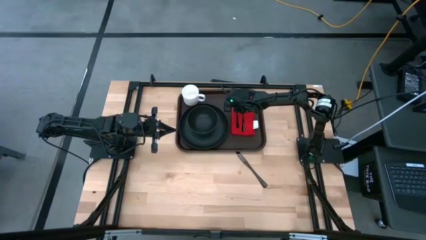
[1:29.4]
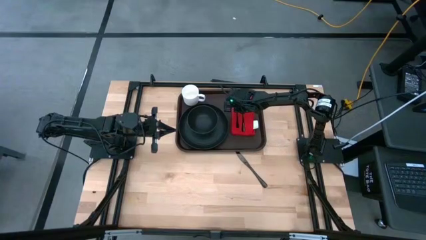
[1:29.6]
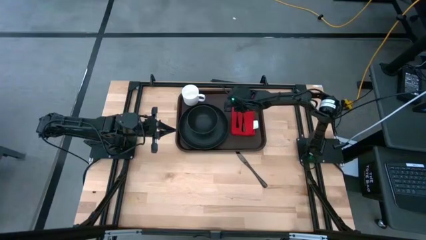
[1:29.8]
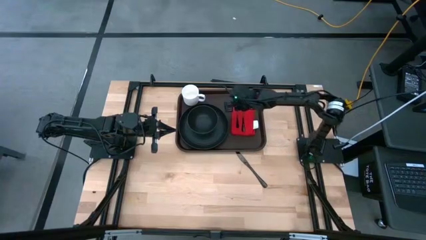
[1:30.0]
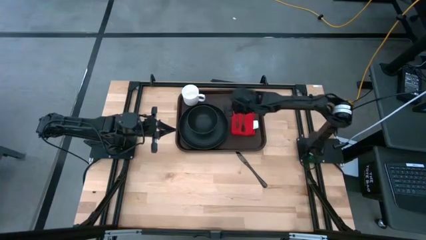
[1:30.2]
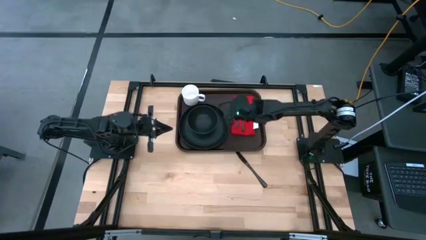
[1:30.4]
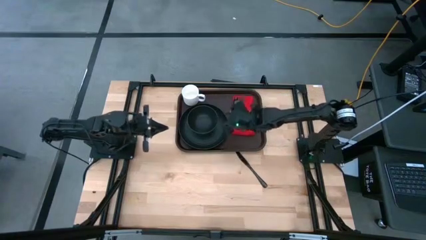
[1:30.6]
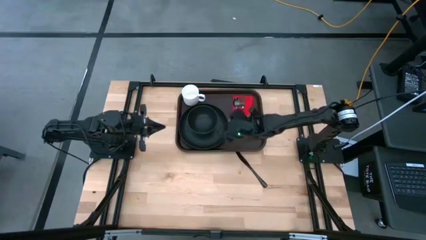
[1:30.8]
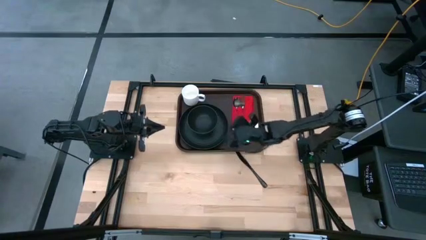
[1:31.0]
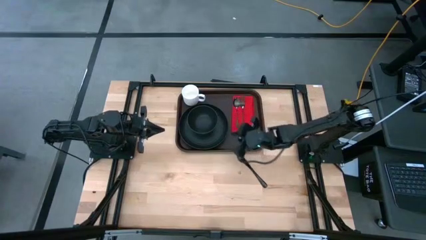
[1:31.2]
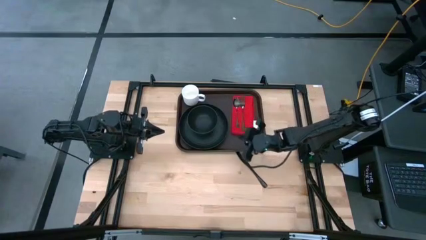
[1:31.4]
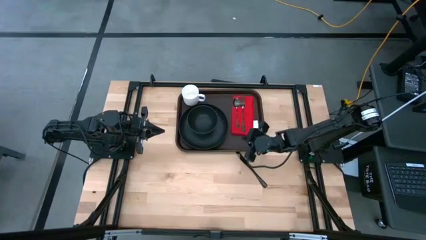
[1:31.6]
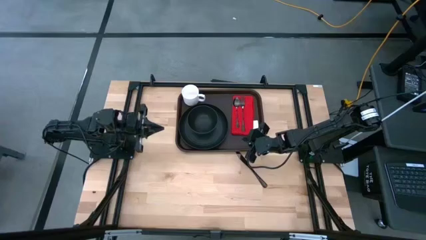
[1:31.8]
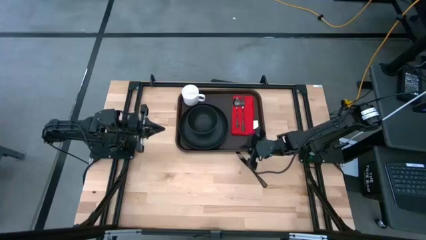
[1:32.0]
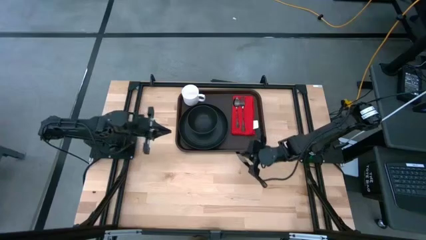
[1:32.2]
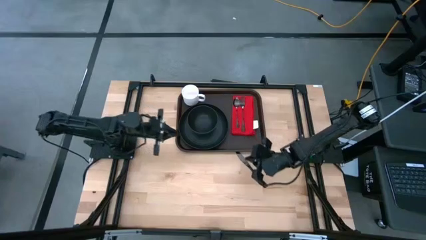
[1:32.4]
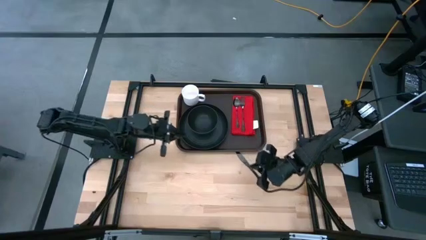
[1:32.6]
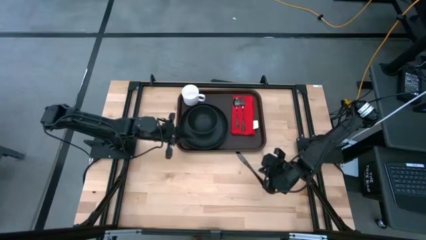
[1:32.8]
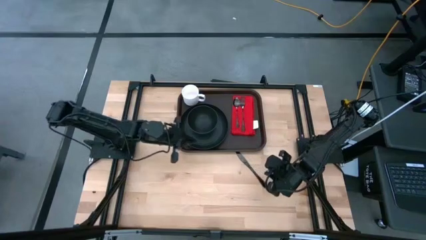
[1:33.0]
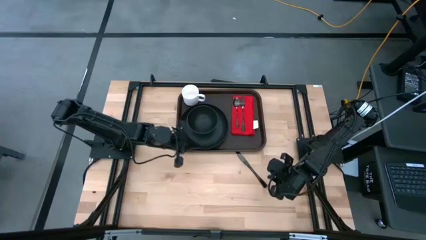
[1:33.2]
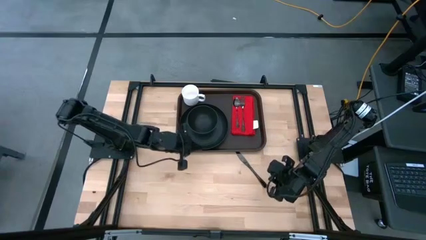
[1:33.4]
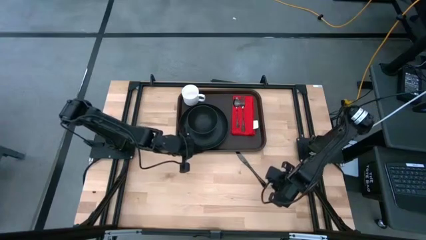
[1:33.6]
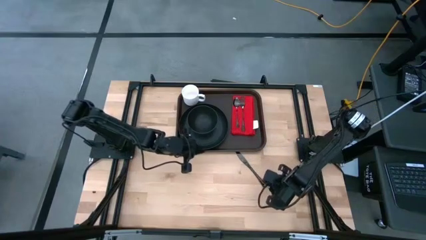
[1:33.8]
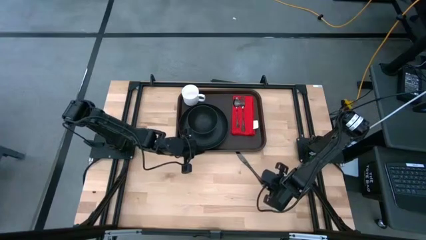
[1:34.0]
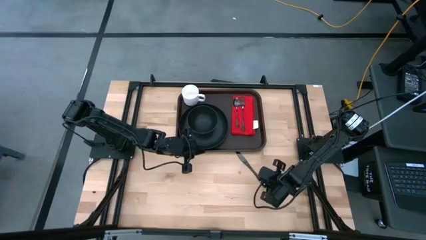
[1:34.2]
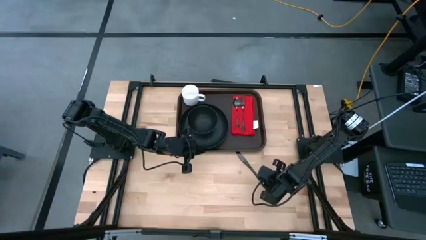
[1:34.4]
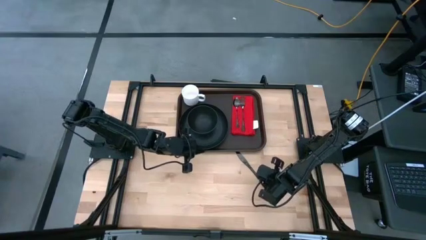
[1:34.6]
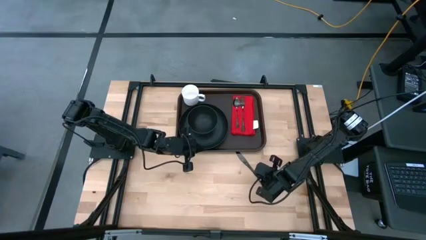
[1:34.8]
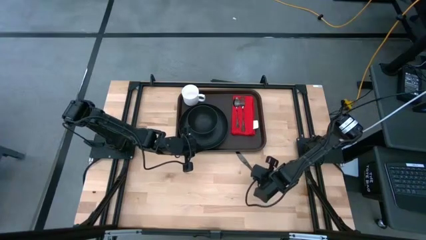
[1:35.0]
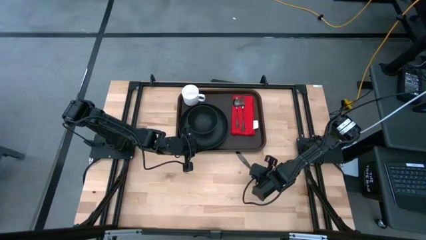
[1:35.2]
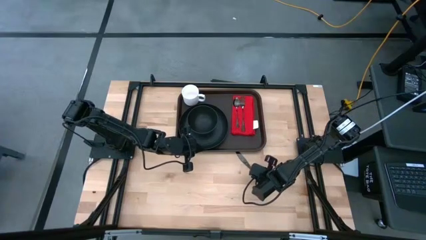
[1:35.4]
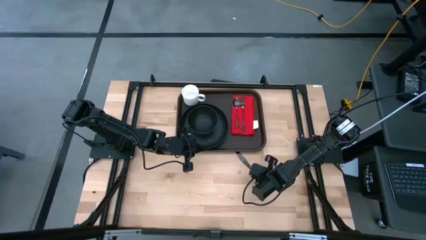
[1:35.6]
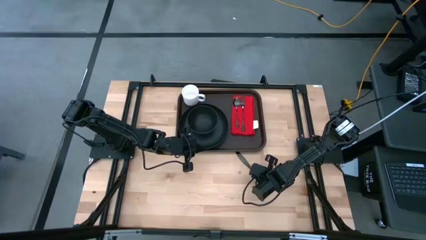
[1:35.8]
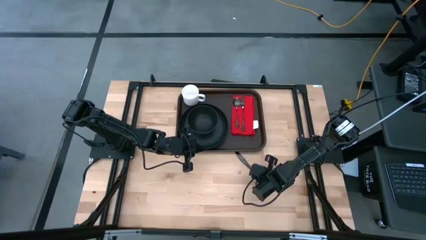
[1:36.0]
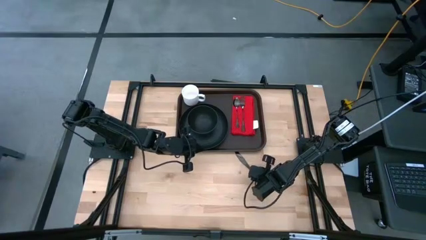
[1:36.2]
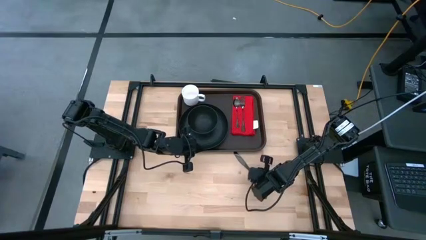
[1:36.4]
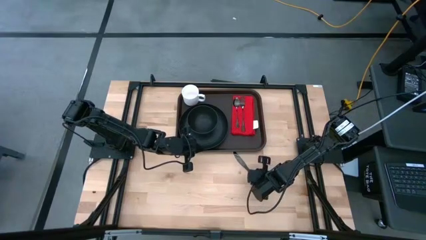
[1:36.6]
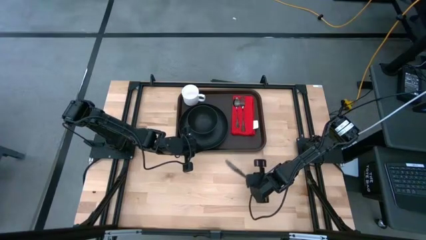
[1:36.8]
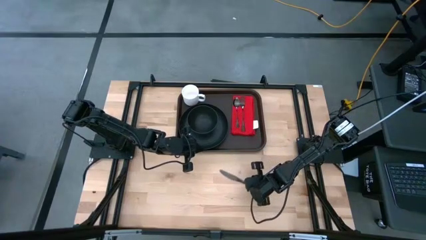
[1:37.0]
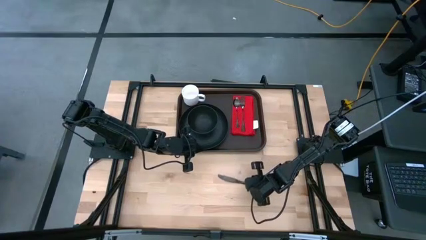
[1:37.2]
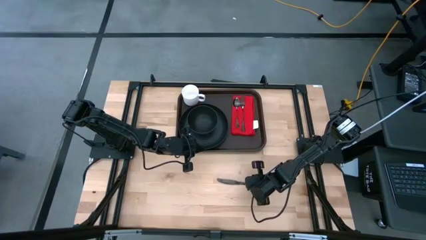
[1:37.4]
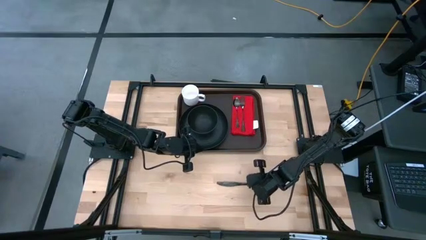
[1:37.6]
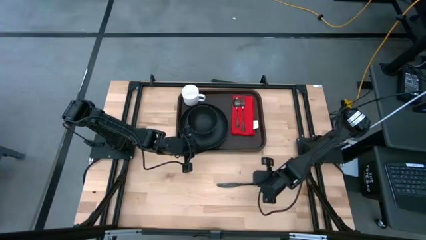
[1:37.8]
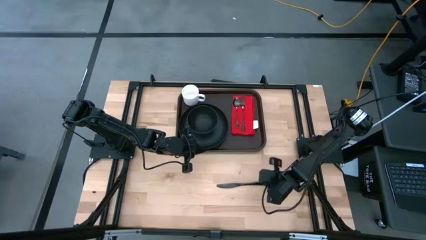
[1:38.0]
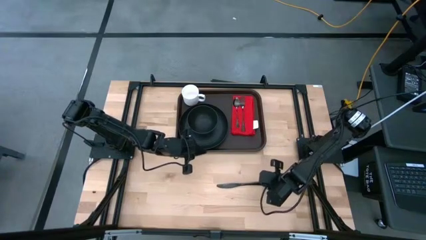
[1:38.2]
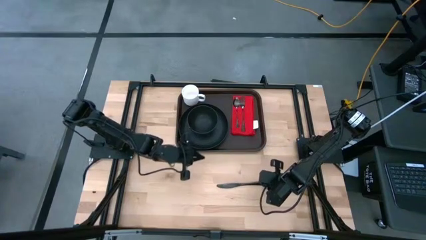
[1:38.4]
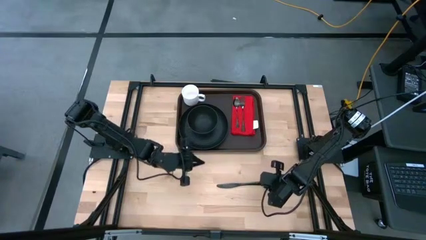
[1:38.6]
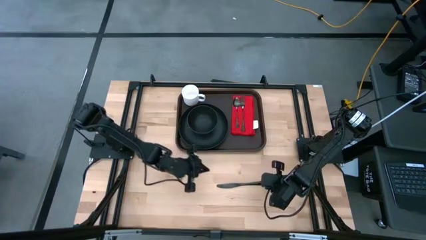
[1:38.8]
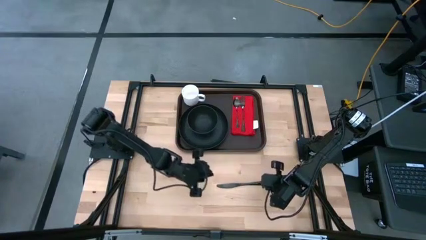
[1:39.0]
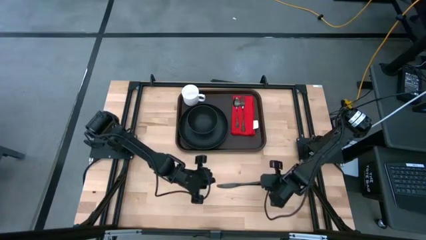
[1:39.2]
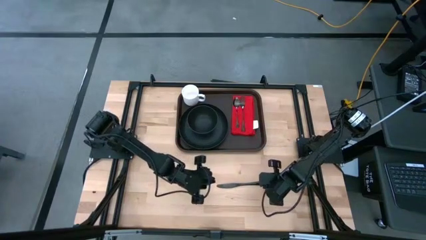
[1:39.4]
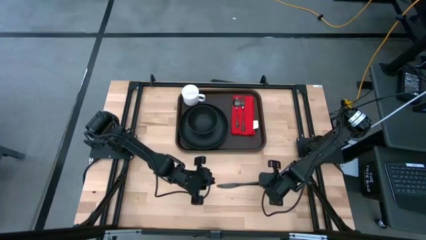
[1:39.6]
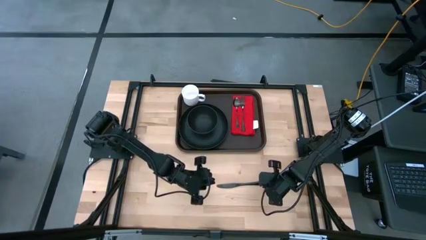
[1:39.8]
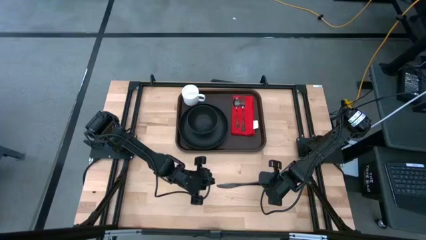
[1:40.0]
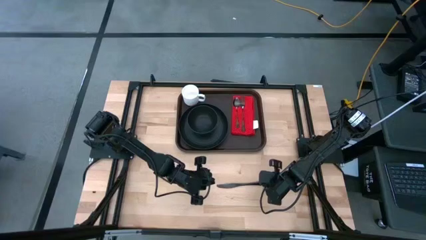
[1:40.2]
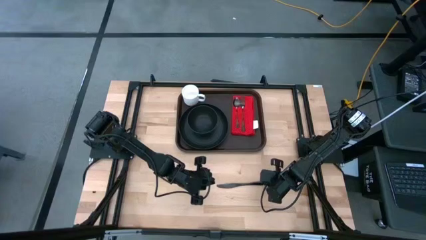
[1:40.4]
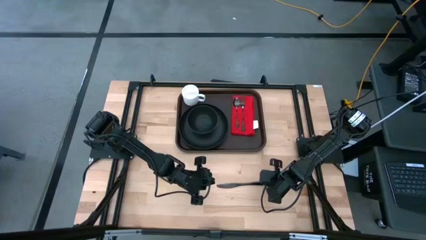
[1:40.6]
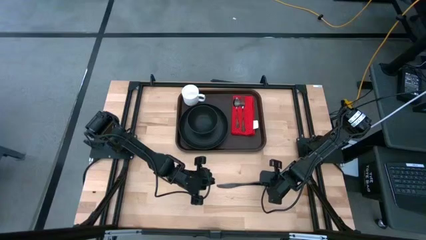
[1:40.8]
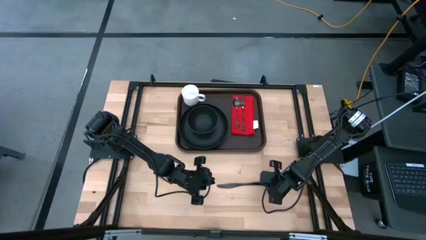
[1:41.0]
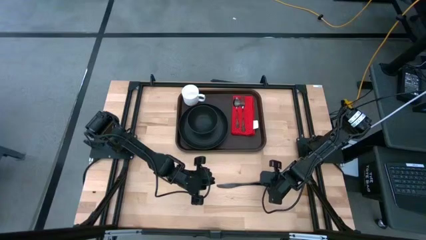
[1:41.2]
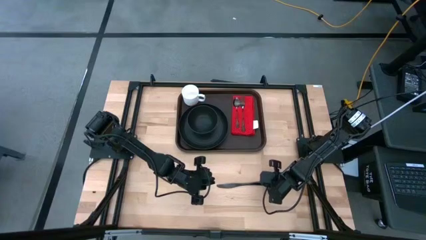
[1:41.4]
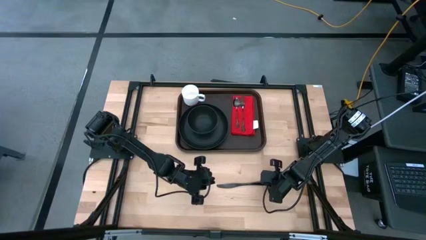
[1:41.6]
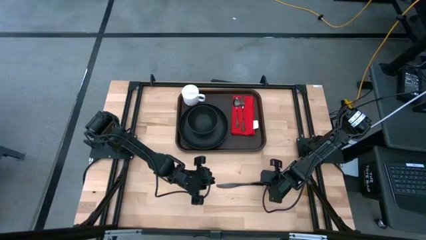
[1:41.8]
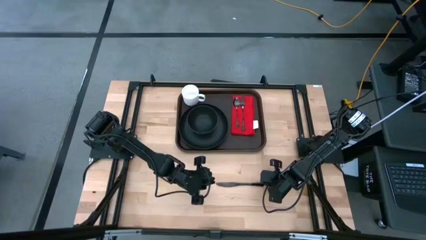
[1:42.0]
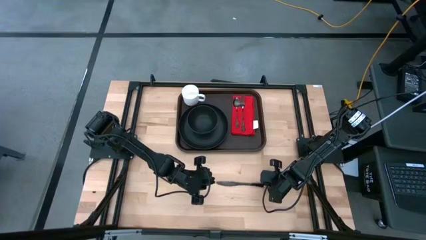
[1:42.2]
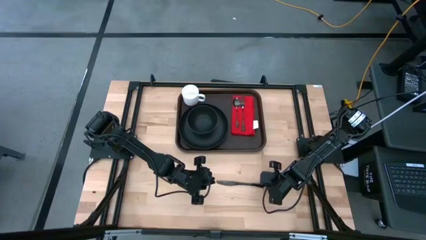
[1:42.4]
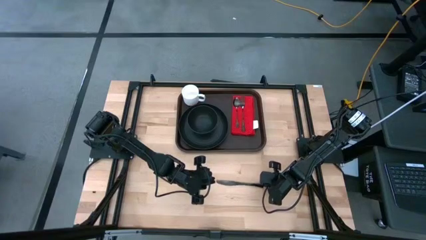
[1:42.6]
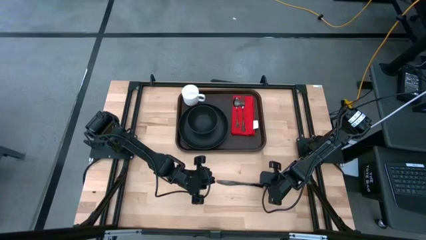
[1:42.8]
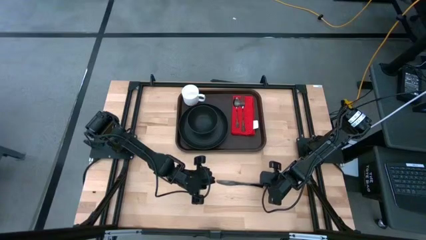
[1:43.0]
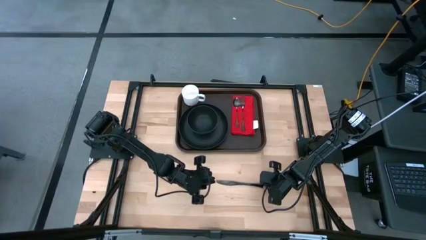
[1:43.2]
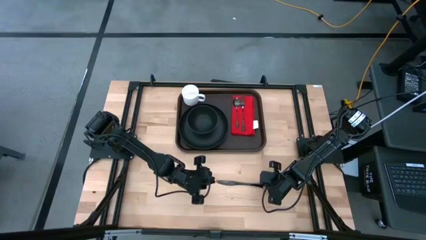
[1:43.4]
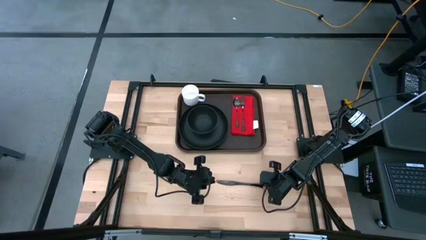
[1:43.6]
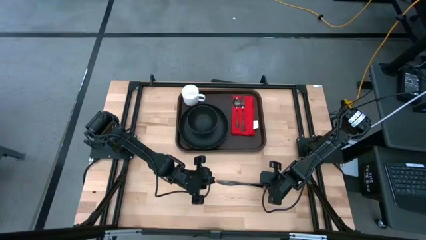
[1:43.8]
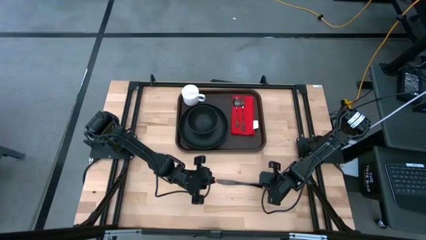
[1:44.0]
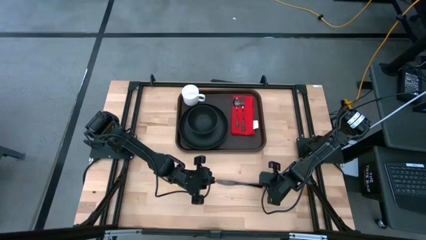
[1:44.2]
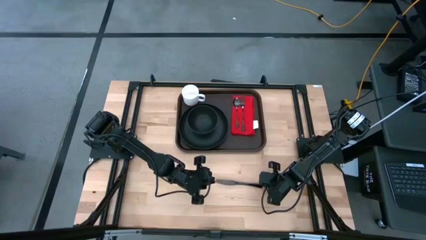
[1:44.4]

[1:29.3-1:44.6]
Task: Set up tray
Put the black table knife on the red napkin to the right of the black fork
